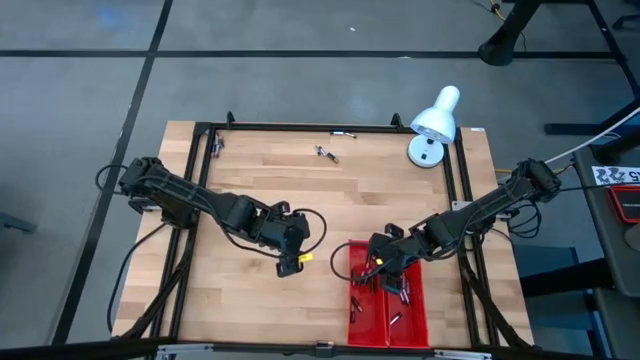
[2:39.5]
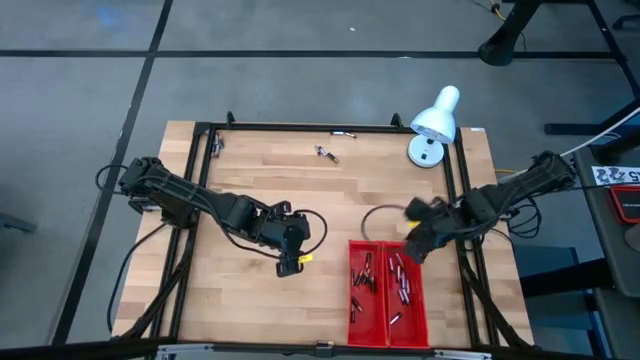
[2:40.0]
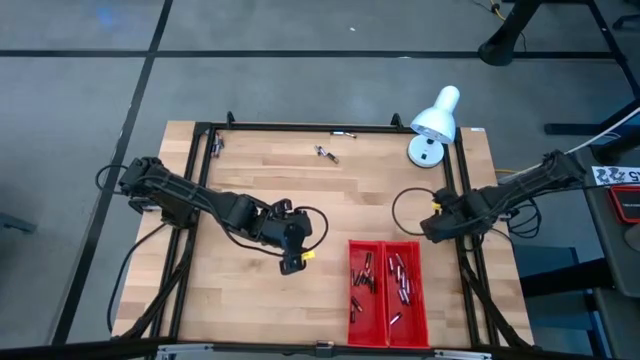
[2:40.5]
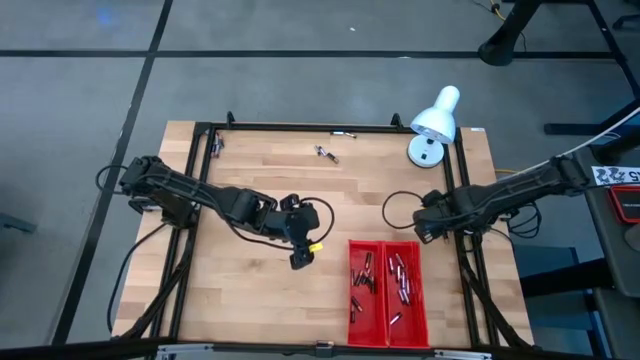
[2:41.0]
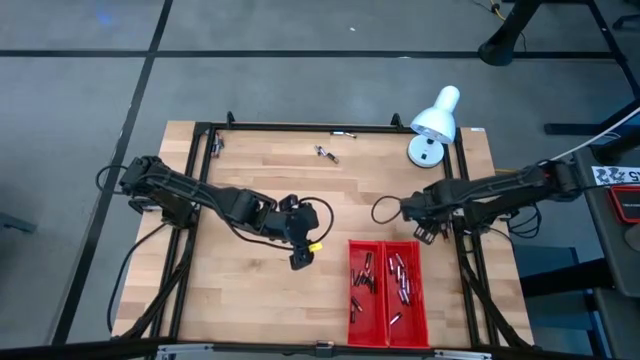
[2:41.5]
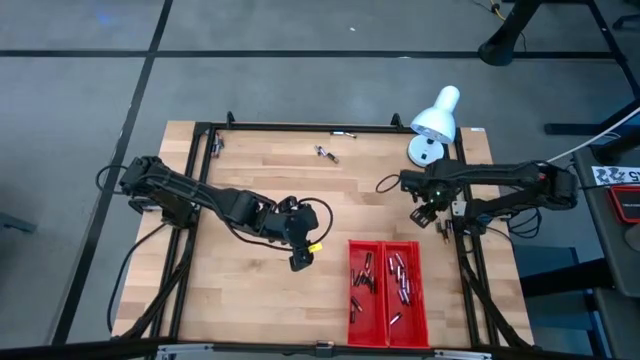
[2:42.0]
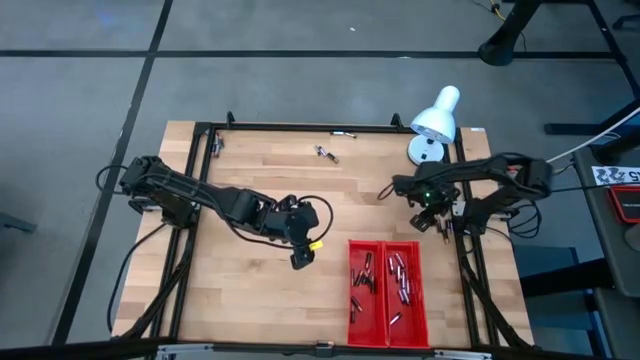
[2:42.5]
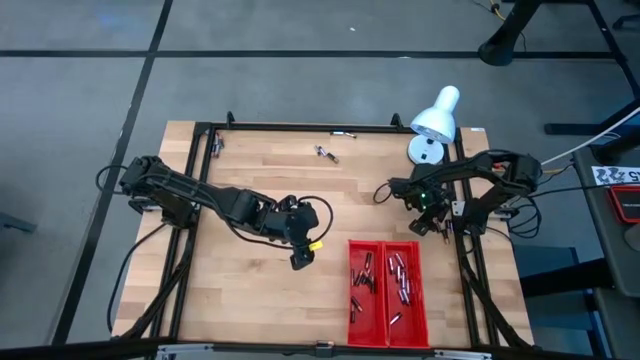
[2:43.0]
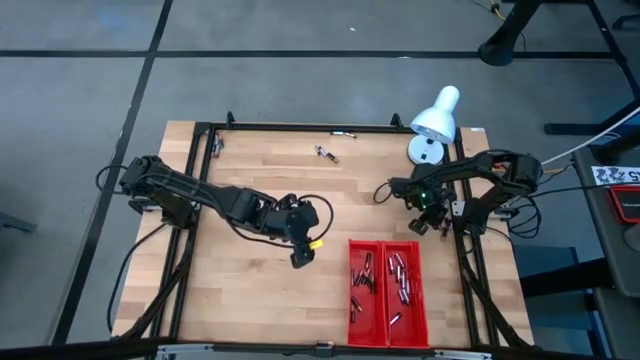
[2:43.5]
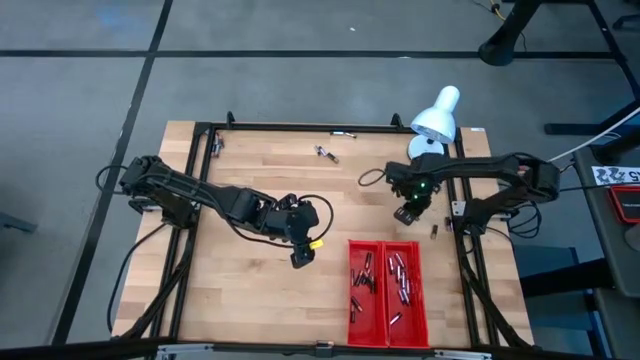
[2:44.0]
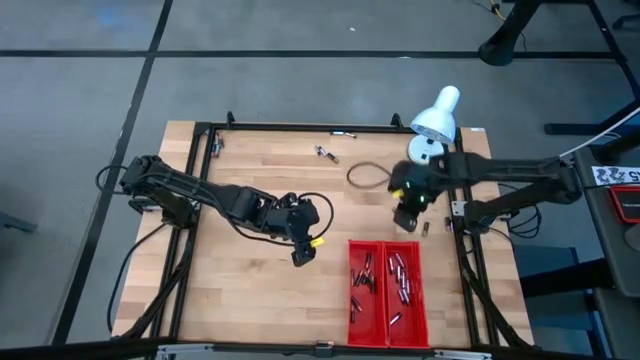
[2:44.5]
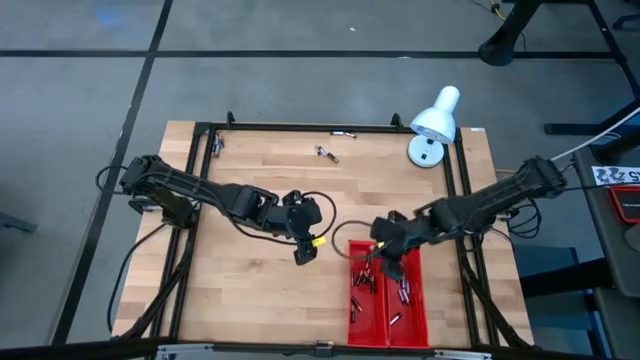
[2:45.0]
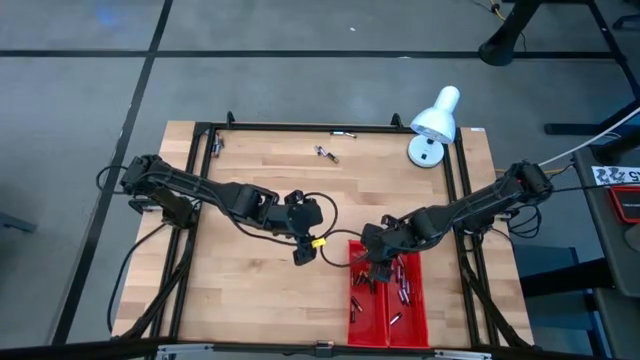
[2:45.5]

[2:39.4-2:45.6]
Task: Sort batteries
Put the black battery into the left red bin

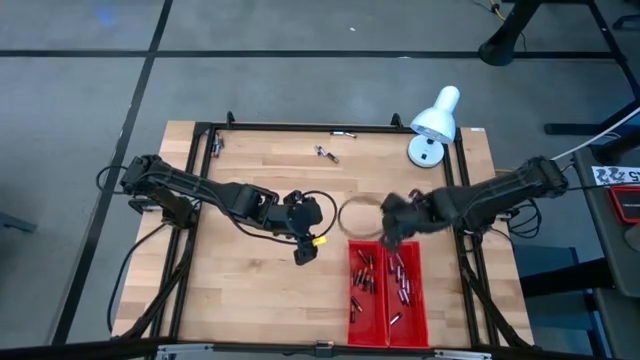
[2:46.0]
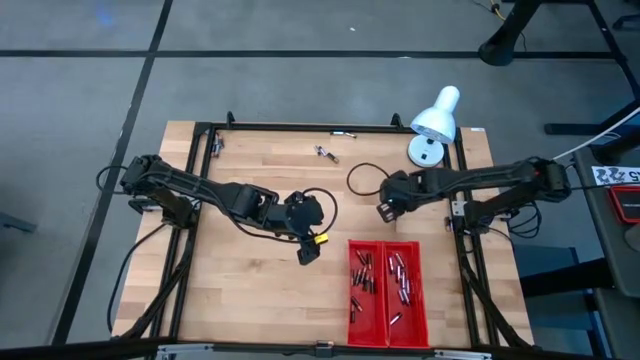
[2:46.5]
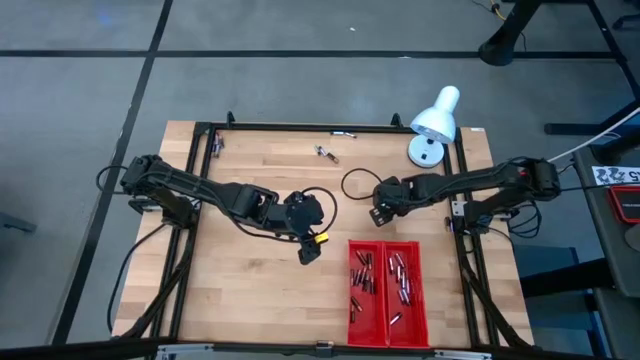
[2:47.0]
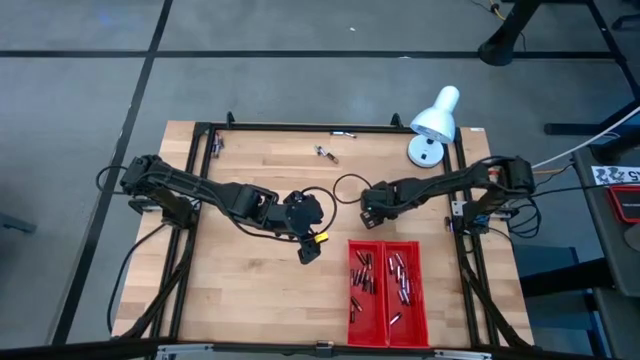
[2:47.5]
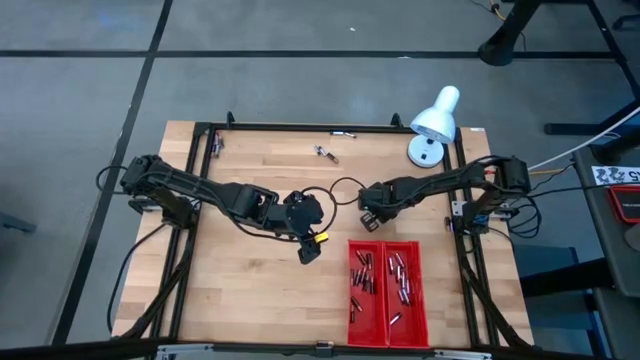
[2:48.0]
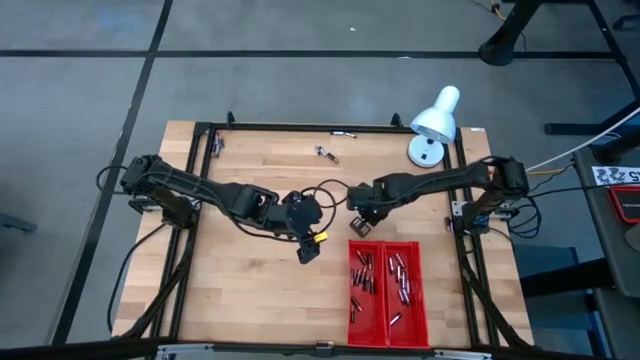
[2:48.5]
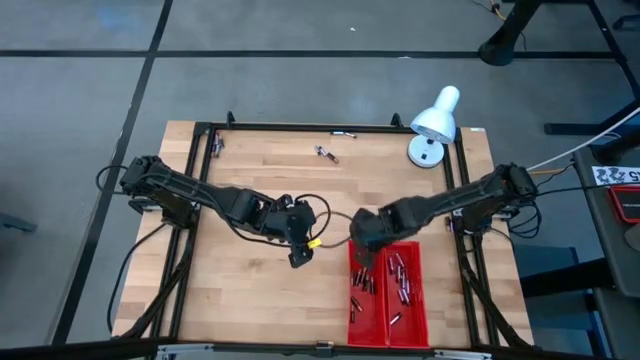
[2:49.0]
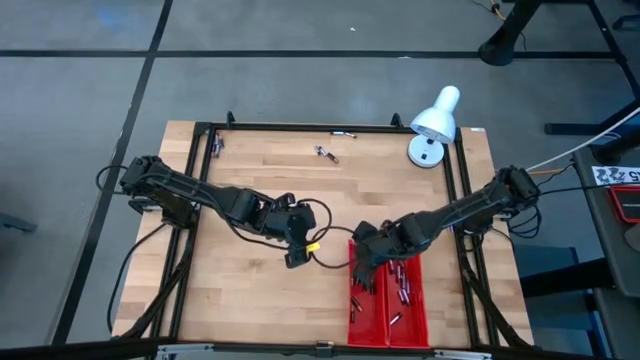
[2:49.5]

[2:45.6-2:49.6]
Put the black battery into the left red bin

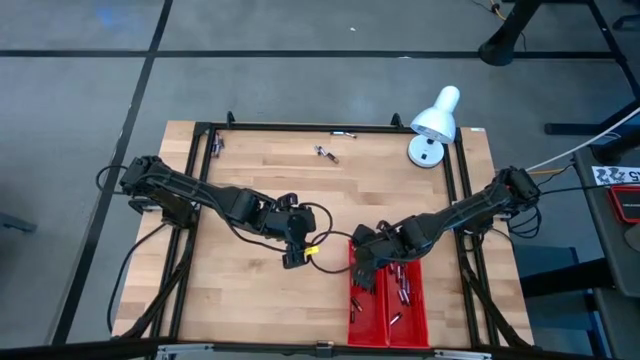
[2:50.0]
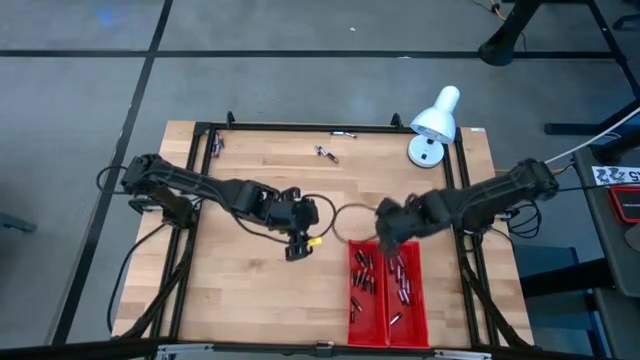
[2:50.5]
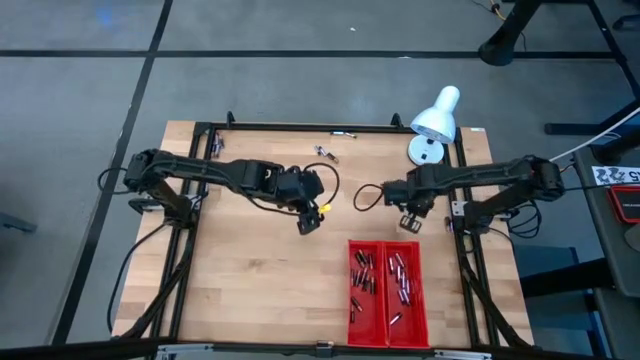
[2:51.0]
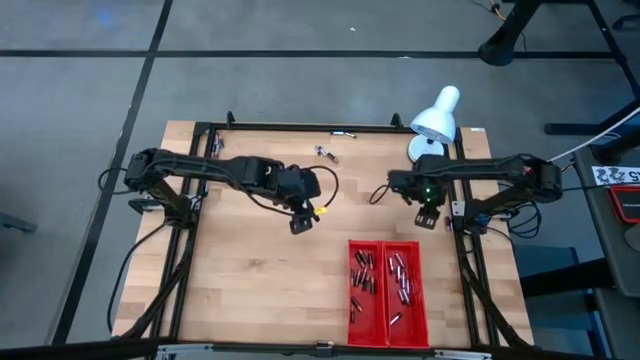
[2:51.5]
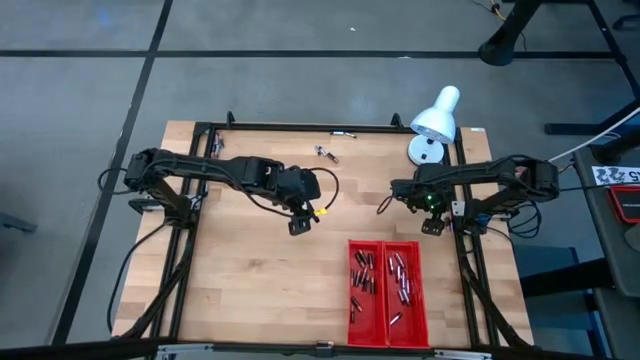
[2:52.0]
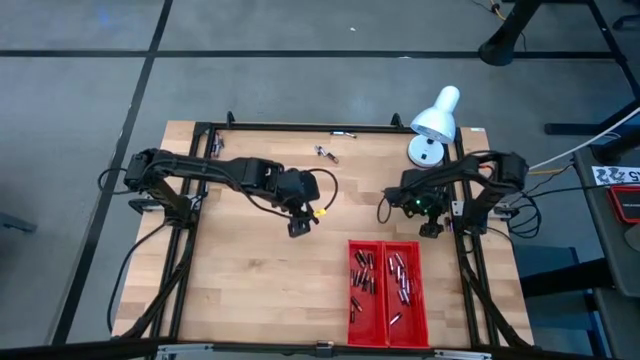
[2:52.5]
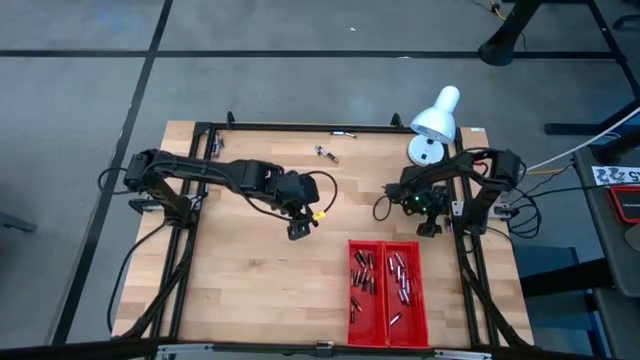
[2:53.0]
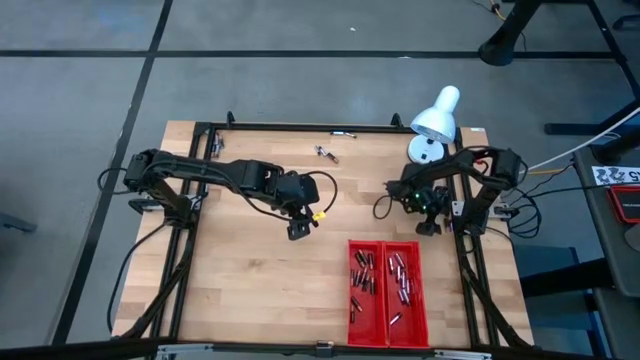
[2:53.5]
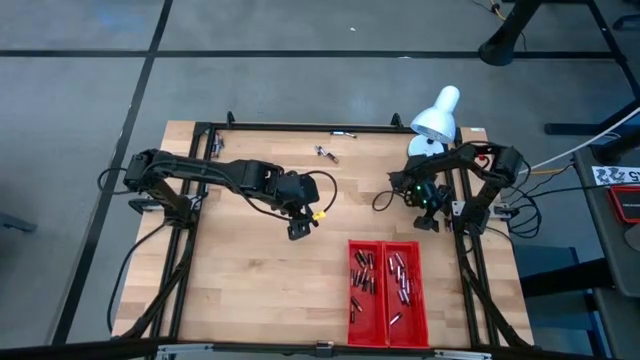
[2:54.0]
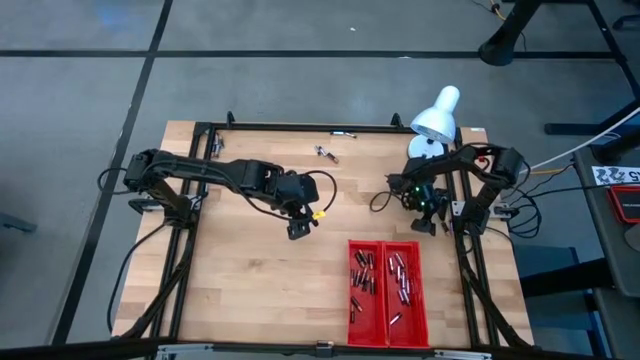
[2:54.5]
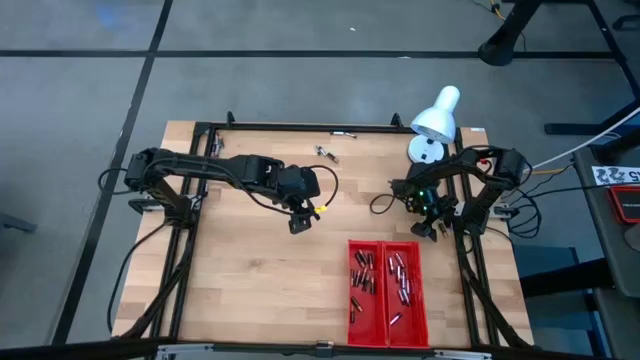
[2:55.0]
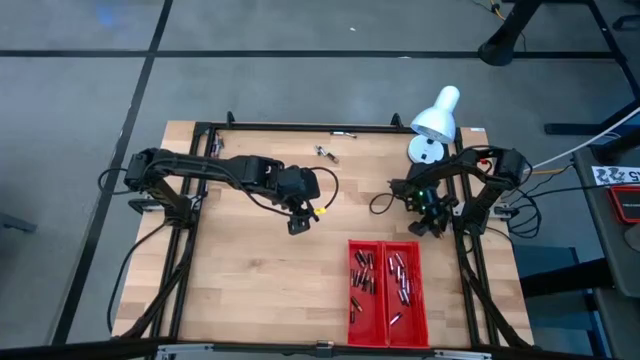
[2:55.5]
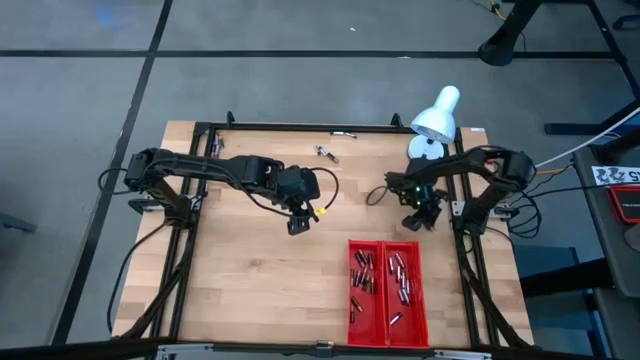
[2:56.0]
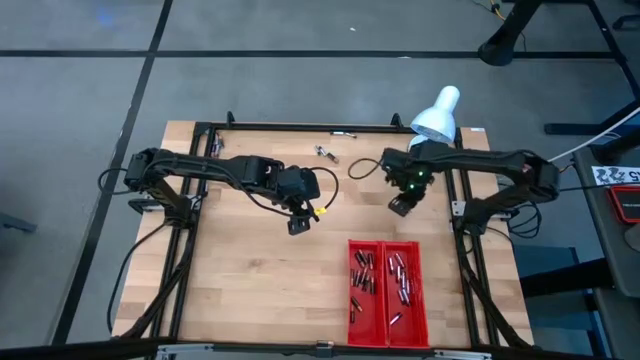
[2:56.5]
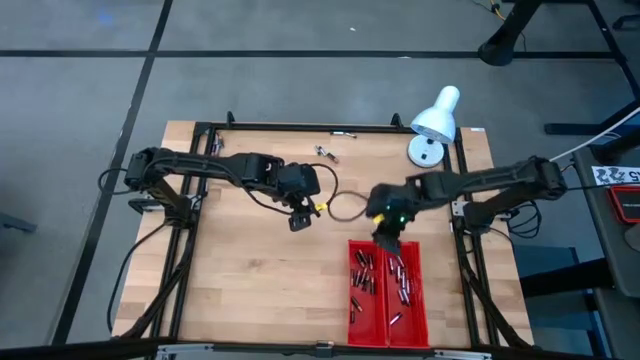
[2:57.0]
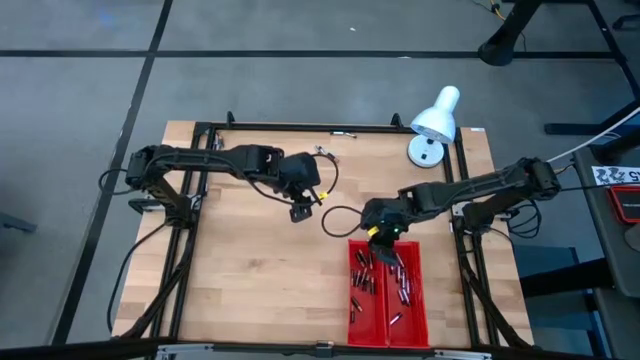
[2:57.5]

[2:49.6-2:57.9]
Put the black battery into the left red bin

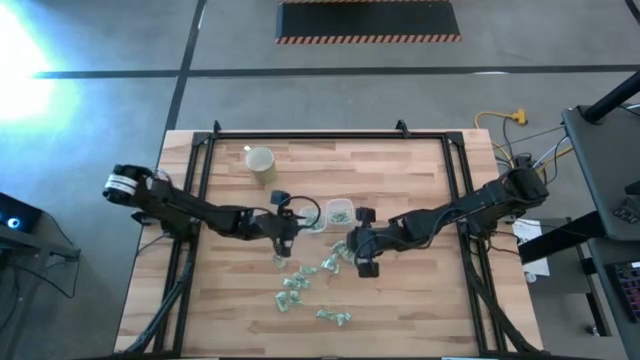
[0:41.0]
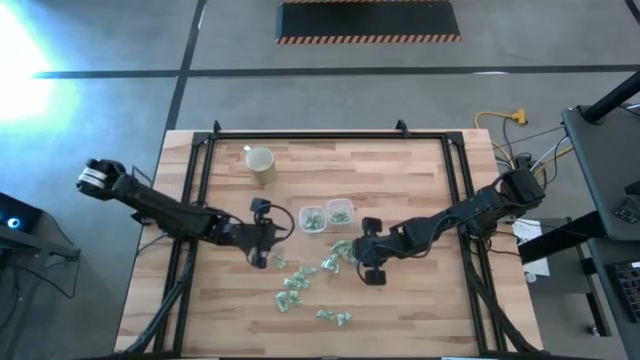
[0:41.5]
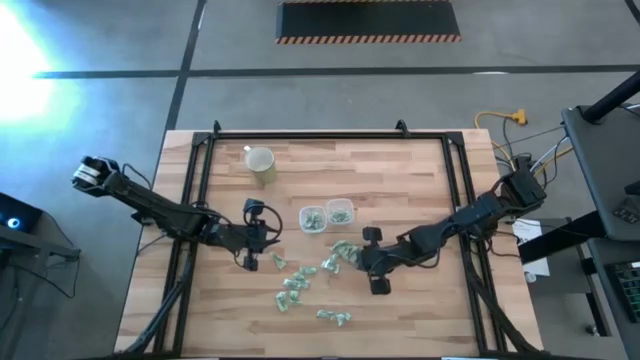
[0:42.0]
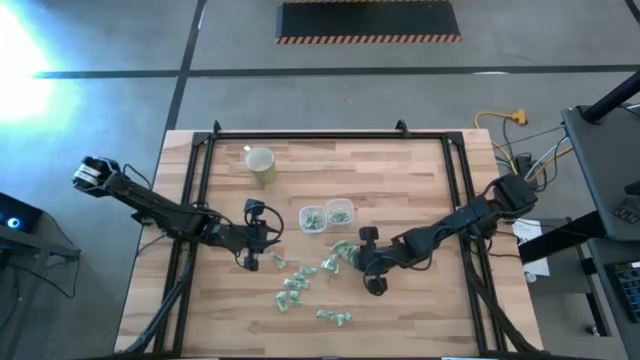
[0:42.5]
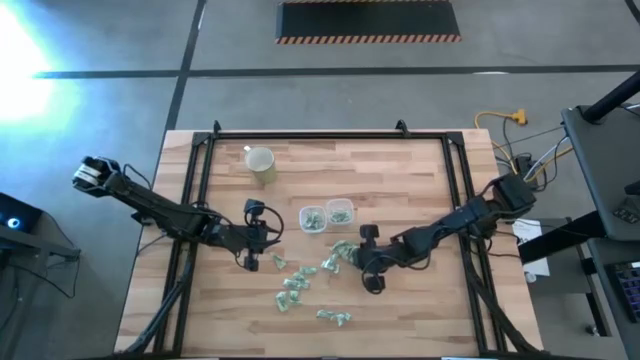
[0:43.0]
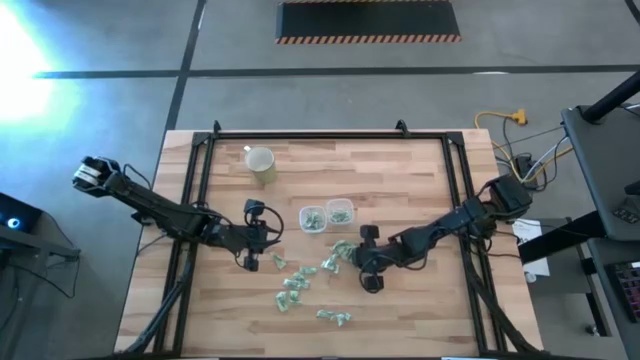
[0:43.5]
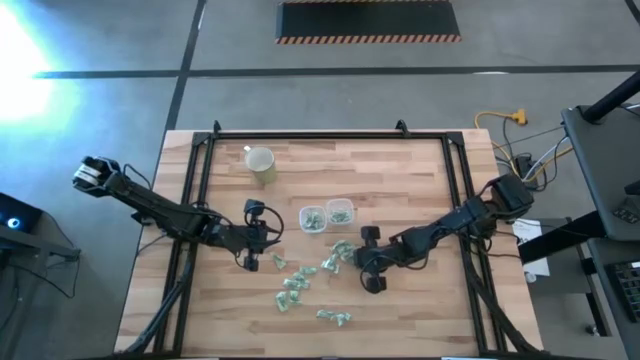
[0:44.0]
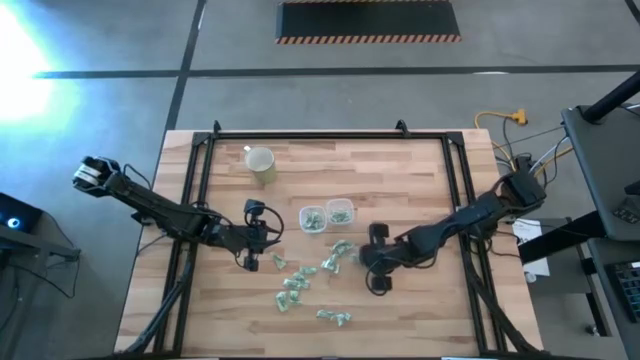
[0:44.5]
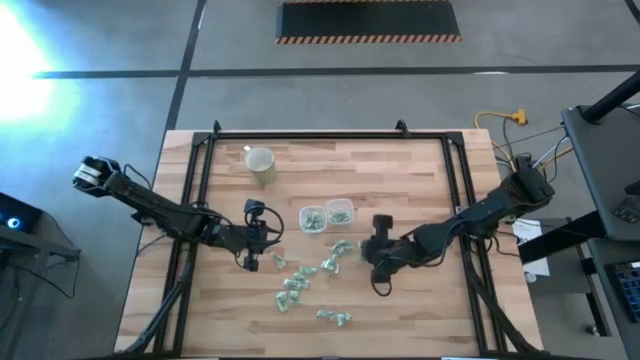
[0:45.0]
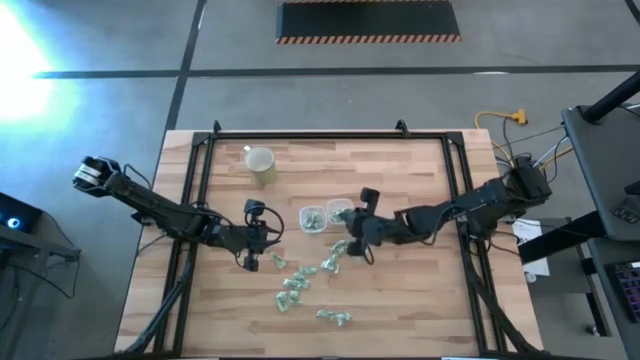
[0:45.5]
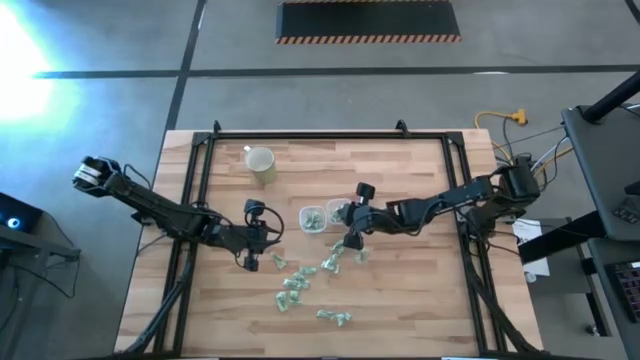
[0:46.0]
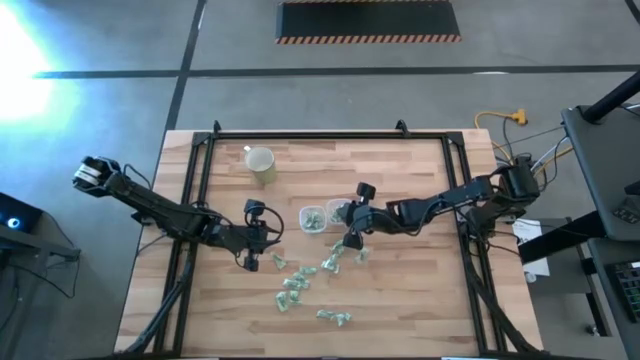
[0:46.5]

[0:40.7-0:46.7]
Task: Pick and place items into bin
Put the stevia packet into the right transparent bin
